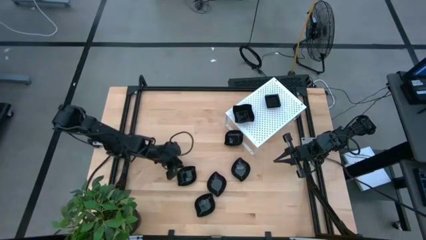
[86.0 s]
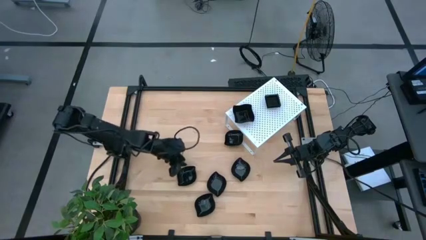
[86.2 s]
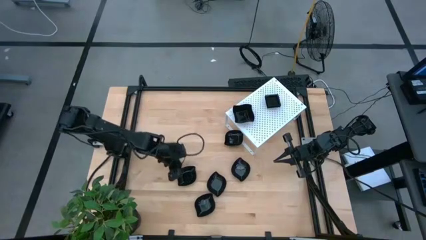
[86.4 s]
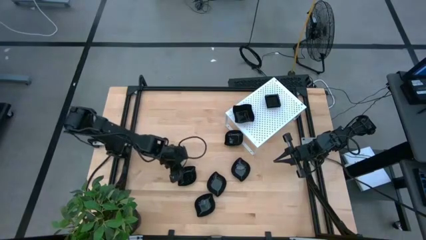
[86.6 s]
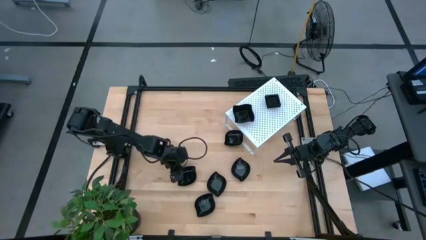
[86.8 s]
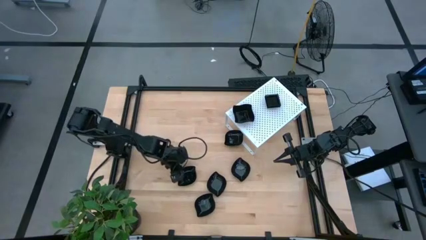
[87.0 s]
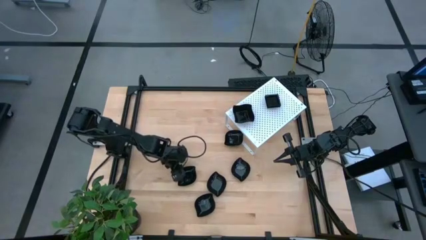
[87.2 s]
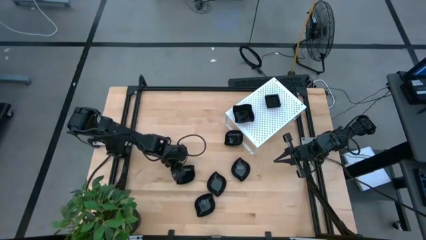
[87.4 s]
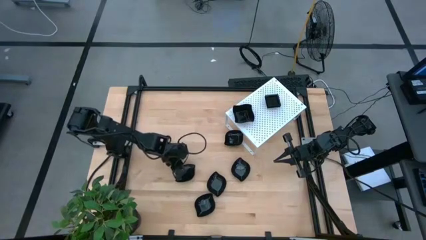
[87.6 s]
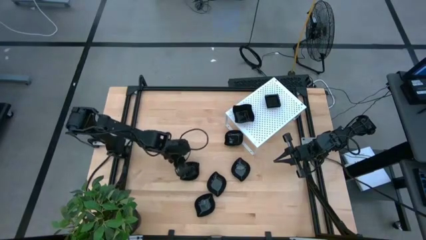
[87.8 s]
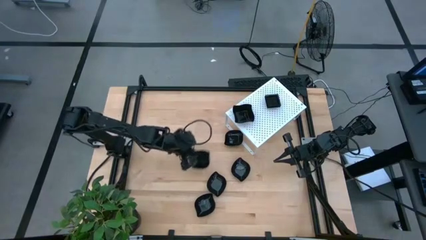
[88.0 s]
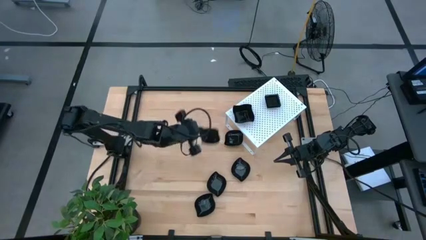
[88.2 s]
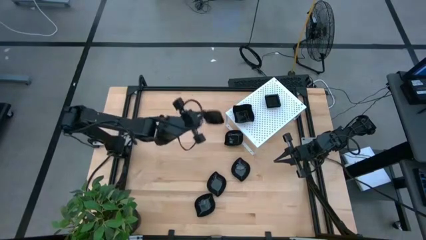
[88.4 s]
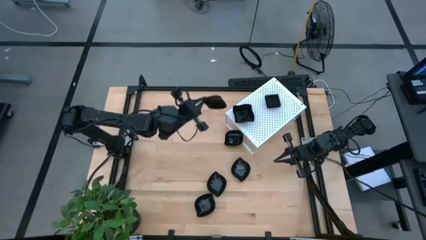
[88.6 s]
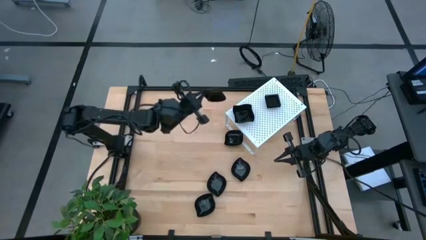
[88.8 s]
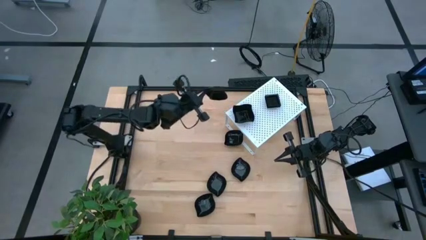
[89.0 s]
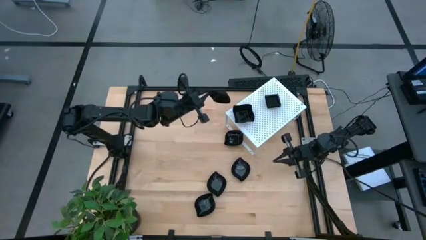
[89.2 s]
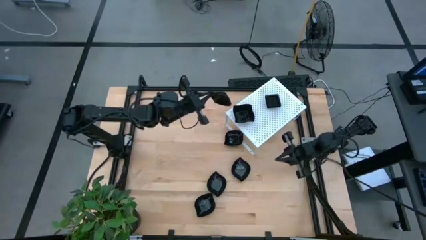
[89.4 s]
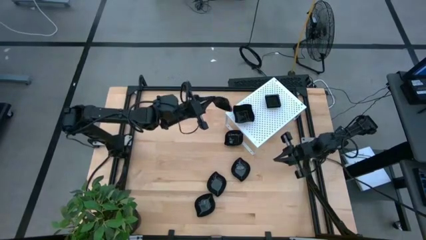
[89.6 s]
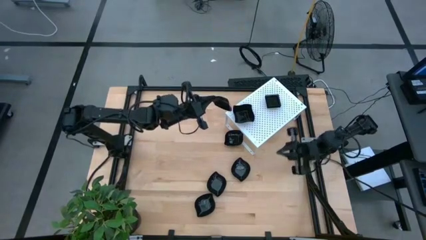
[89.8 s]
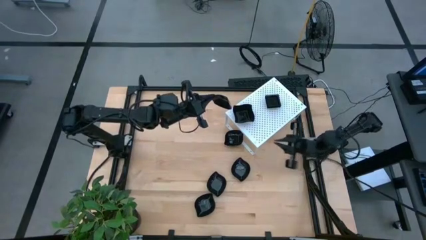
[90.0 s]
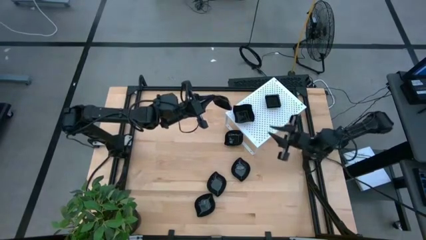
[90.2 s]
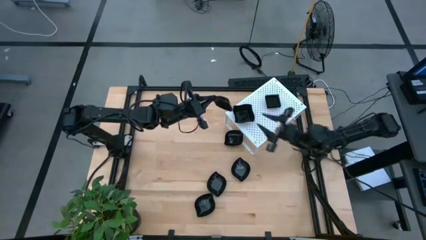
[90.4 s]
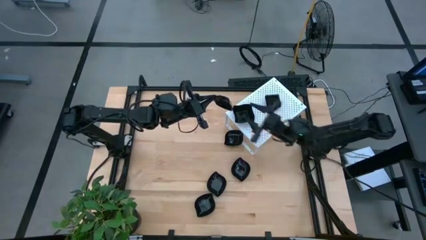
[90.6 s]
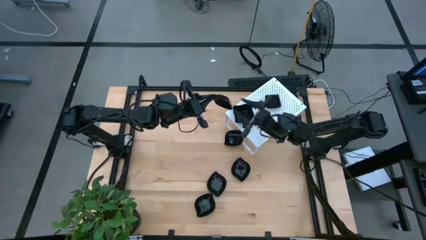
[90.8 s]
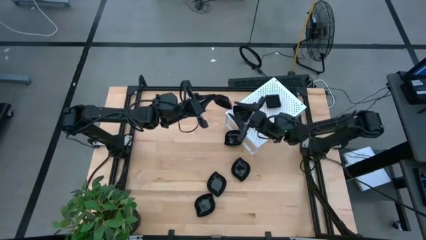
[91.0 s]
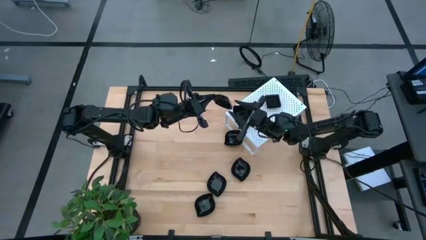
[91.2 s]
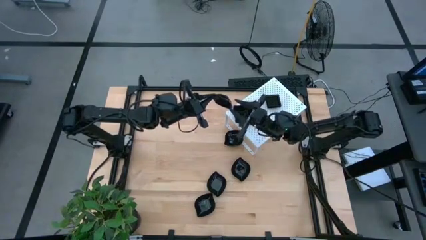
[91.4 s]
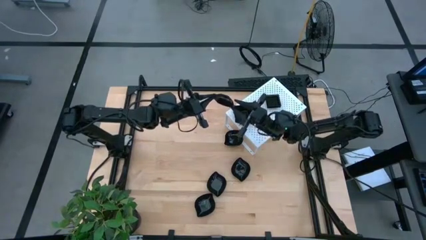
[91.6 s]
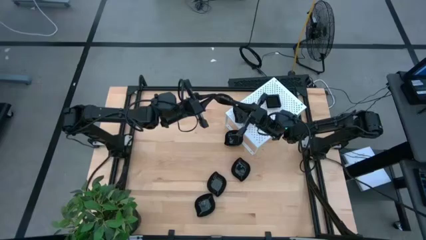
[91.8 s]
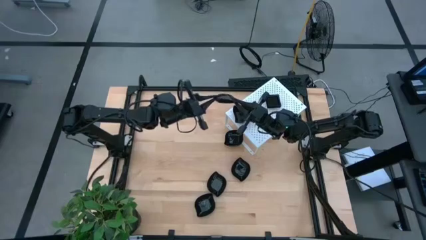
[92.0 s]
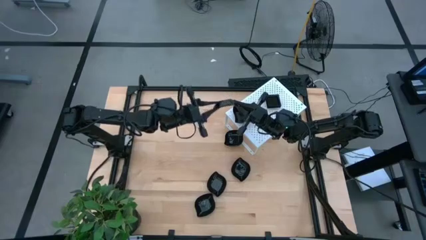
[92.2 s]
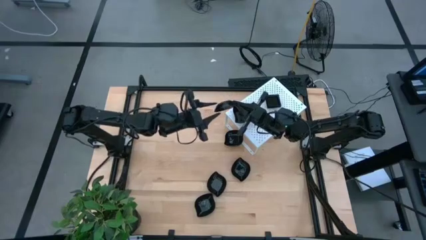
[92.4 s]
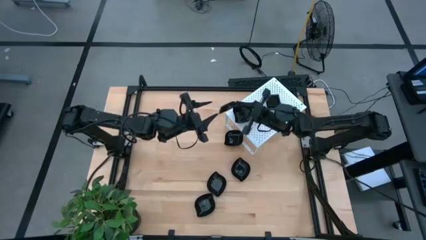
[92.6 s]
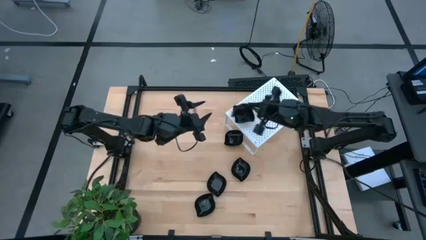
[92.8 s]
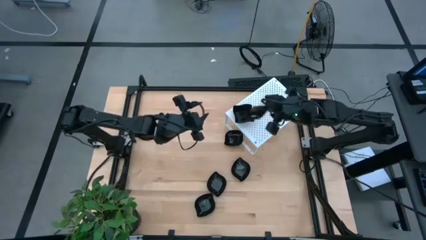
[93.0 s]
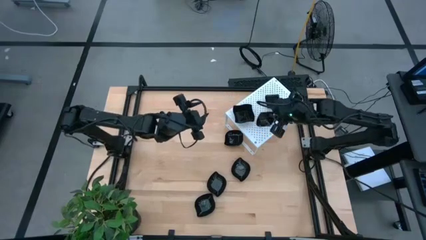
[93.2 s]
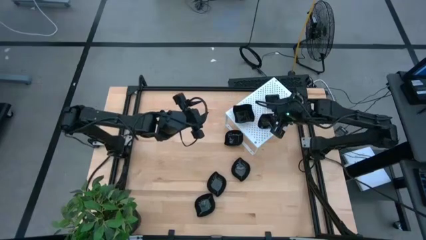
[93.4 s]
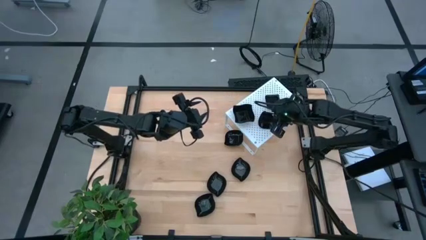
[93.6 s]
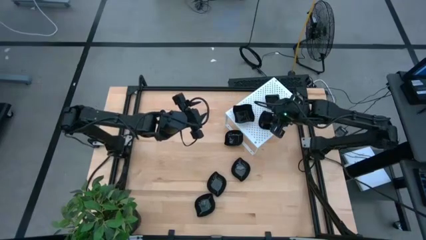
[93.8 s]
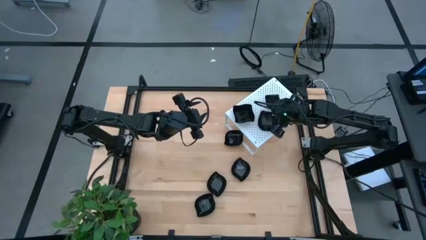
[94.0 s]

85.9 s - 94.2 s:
Task: Pick & Place Mini shaped plates
Put the black leaf shaped plate on the shelf

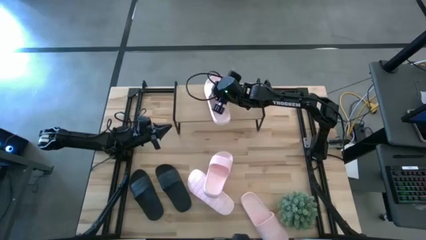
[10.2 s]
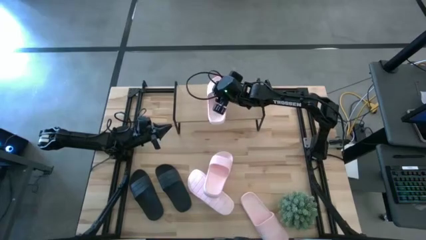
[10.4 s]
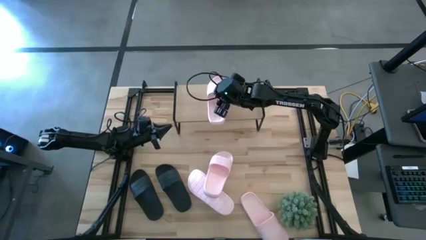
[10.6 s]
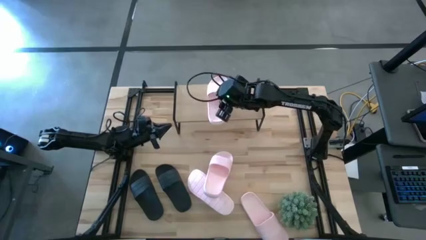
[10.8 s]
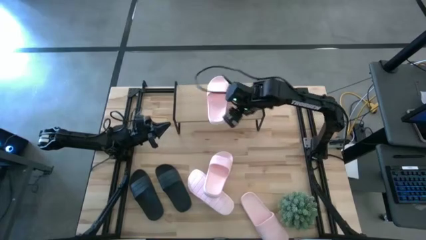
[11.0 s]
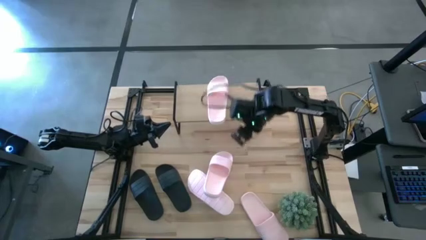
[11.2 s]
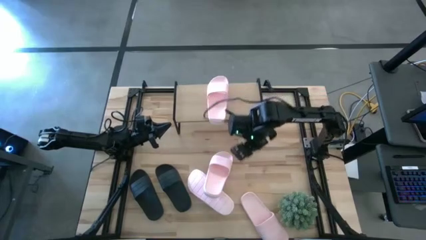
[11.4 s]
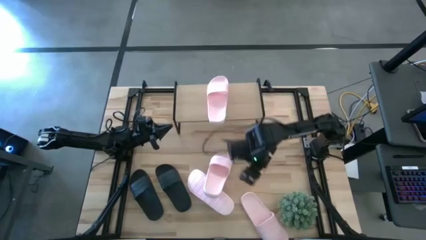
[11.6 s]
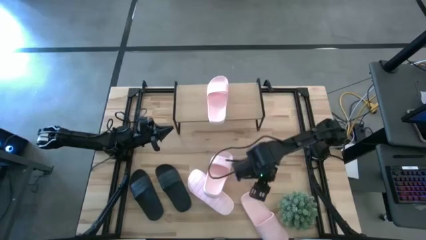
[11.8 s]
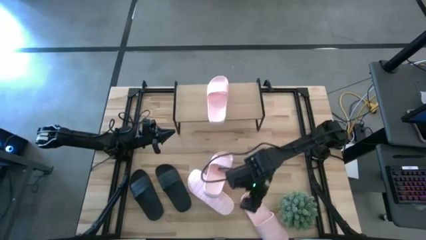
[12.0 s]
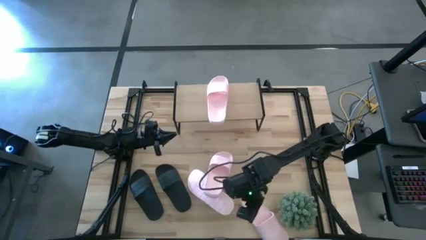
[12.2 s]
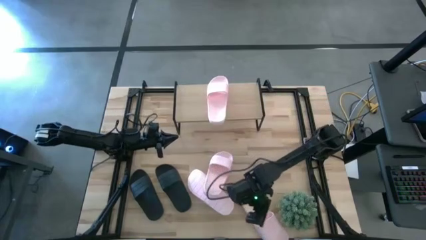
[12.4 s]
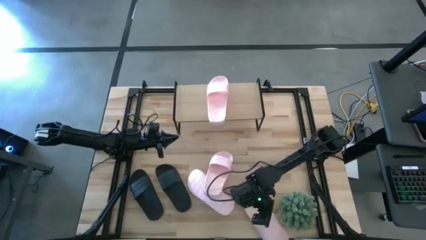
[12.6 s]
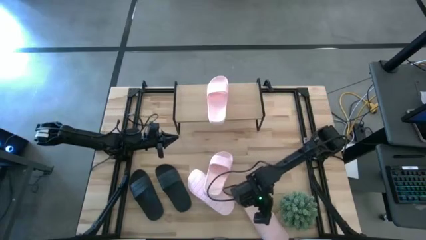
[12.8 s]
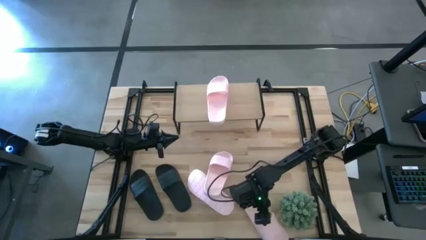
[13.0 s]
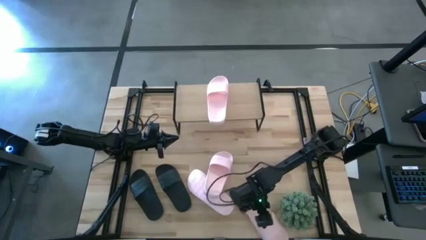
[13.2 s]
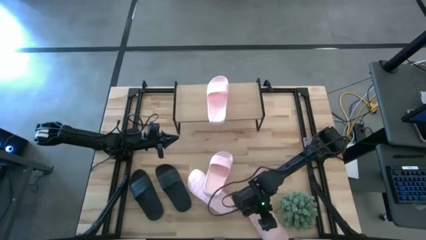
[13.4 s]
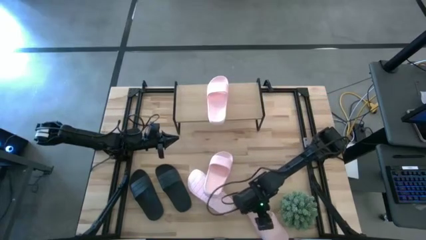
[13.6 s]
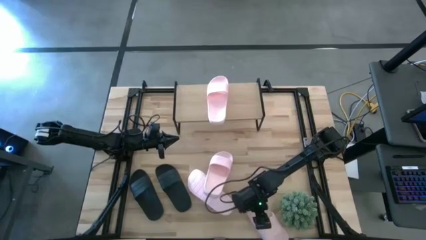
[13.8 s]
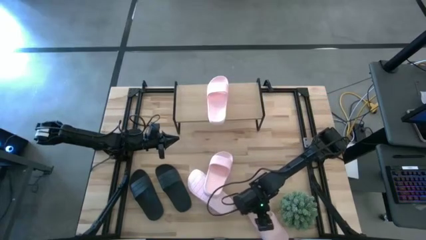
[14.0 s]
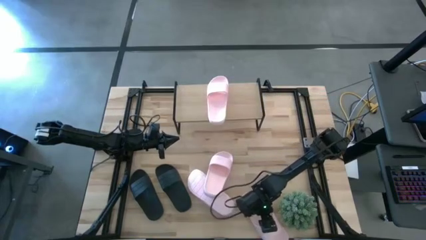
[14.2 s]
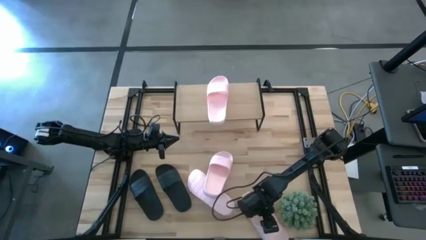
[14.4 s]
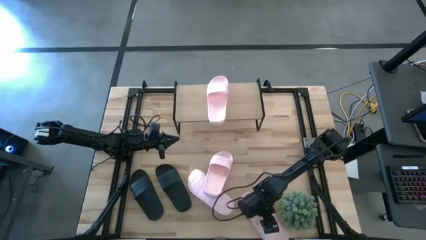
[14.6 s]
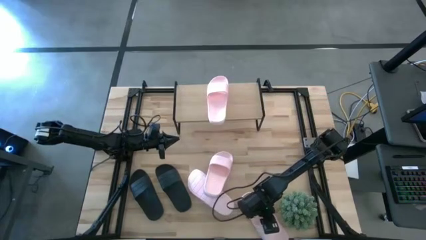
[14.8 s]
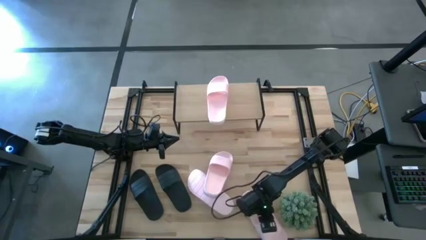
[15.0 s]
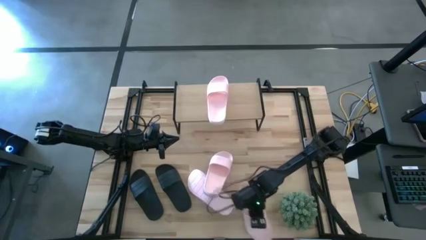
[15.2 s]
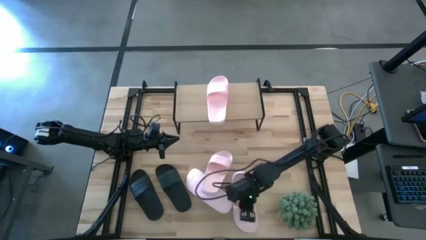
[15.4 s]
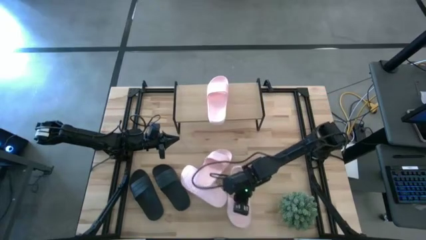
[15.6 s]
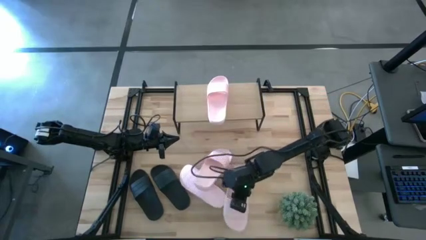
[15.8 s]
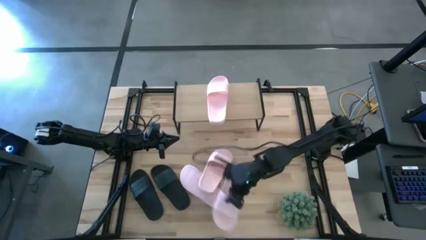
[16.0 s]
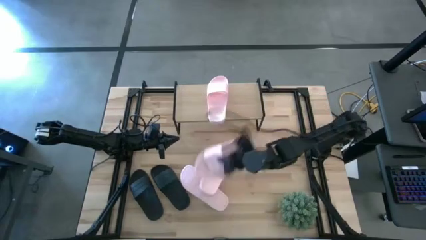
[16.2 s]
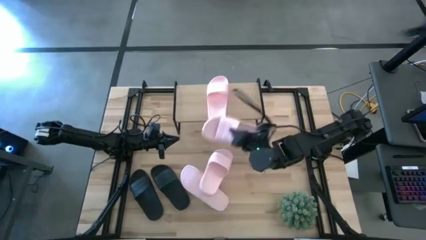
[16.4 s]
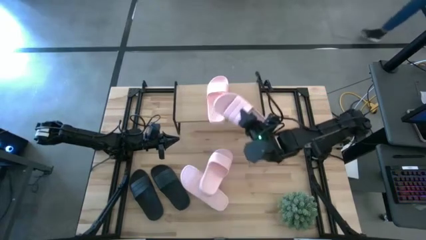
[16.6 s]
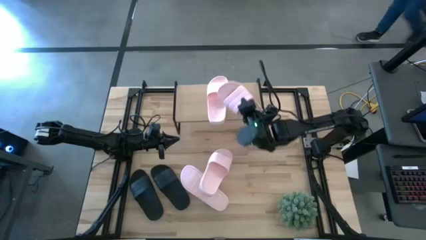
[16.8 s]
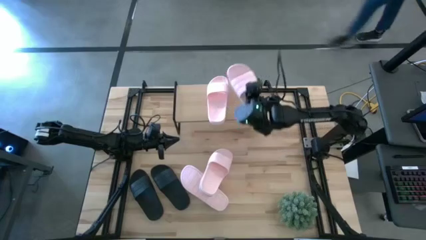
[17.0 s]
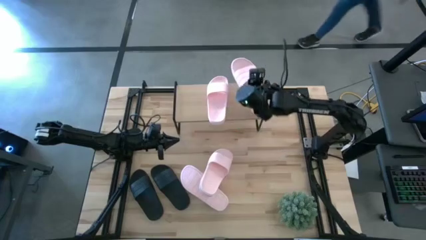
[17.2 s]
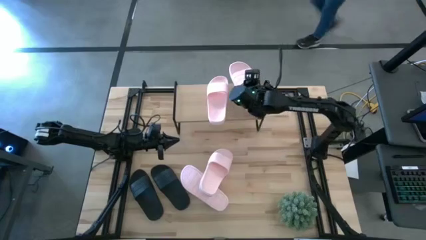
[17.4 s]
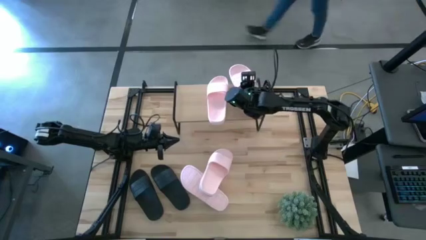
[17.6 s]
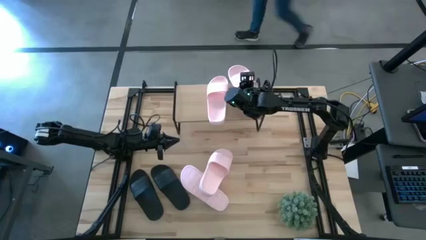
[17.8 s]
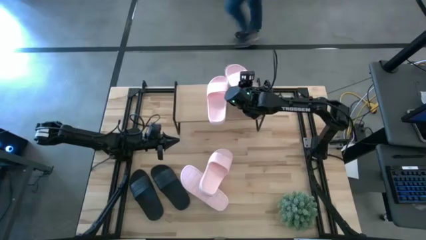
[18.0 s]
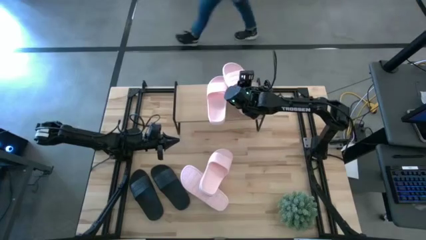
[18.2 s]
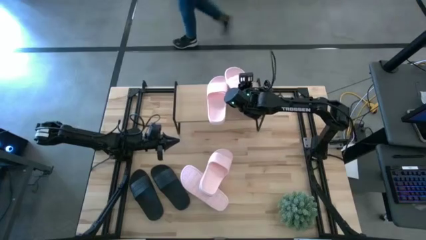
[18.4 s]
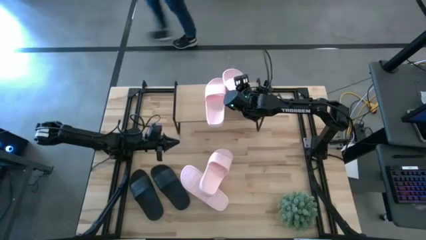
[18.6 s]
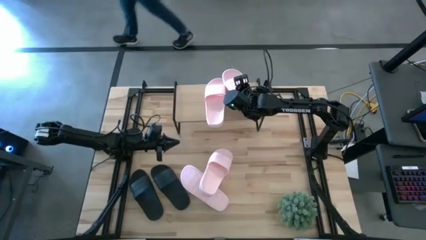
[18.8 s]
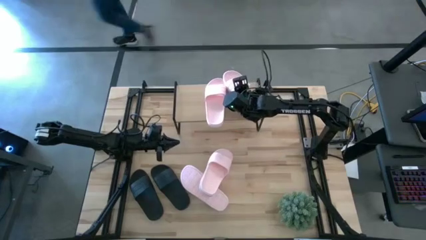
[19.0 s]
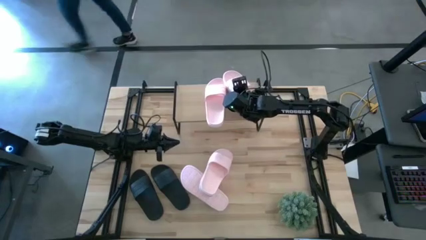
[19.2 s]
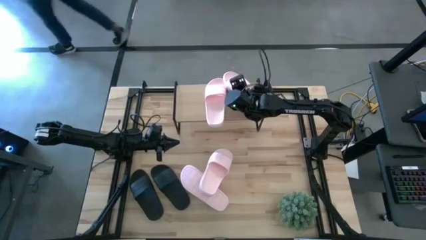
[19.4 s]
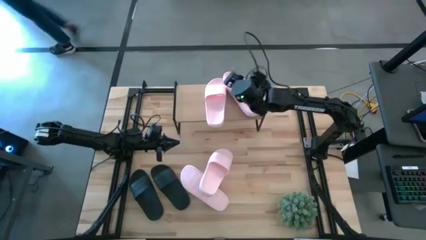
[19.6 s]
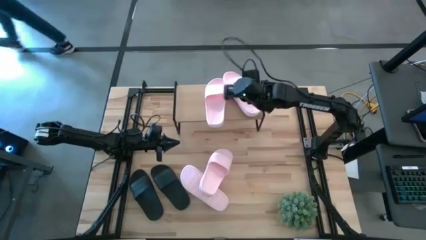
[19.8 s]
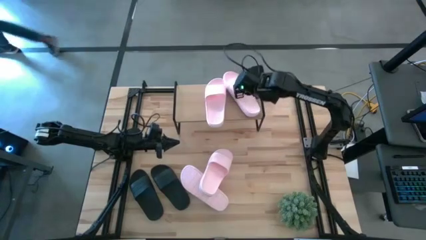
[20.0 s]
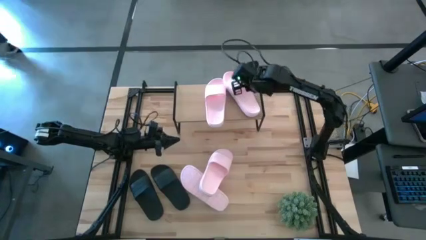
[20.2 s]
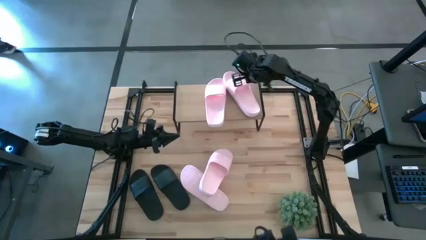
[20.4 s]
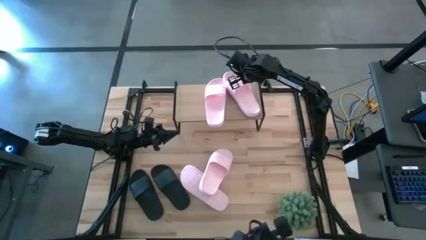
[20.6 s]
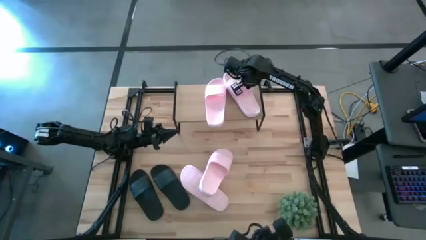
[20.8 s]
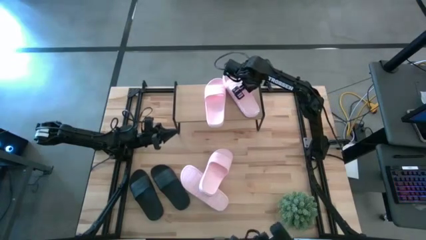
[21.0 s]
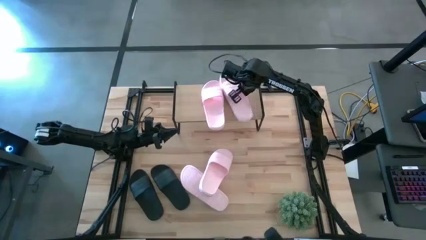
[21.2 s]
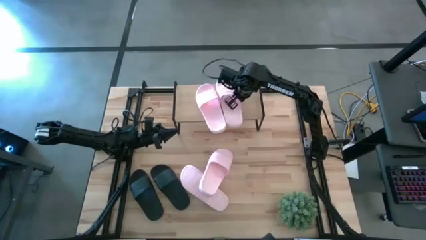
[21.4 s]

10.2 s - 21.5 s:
Task: Pick and place slides into the shelf
Put the pink slide on the shelf
